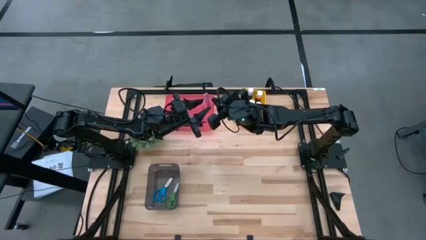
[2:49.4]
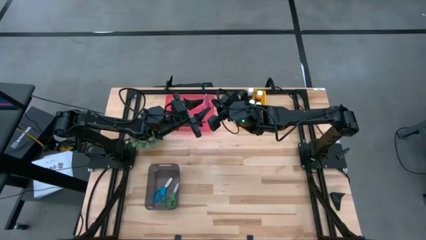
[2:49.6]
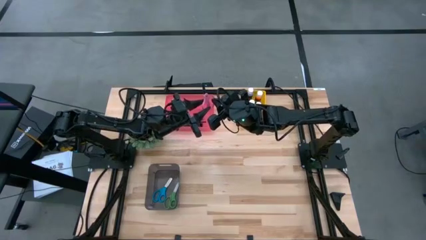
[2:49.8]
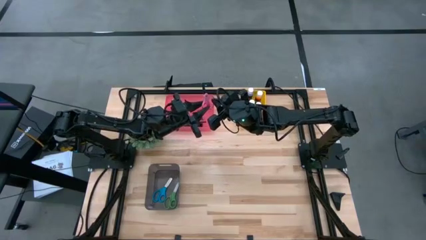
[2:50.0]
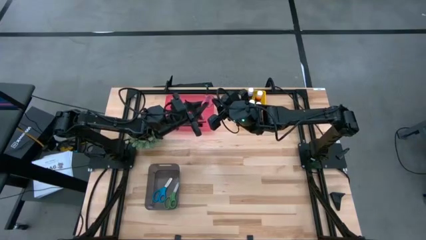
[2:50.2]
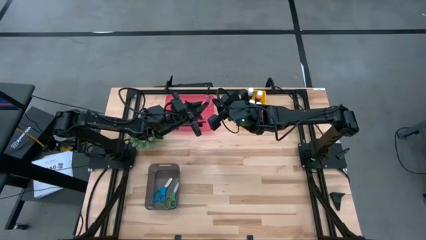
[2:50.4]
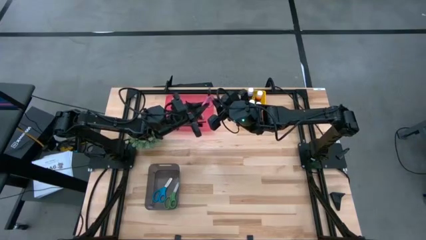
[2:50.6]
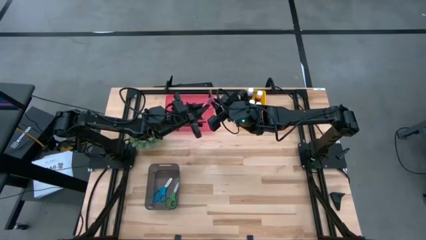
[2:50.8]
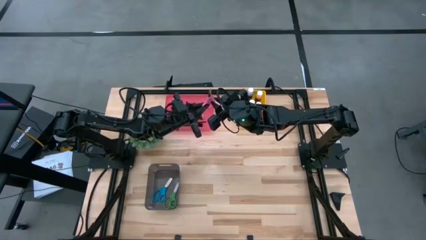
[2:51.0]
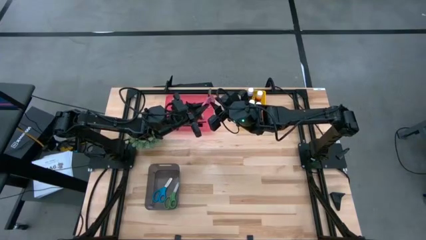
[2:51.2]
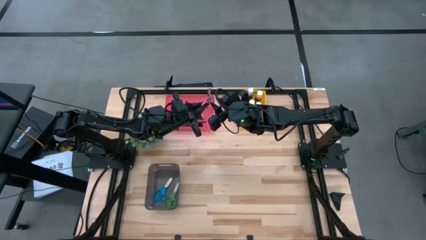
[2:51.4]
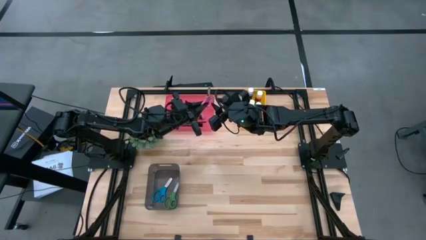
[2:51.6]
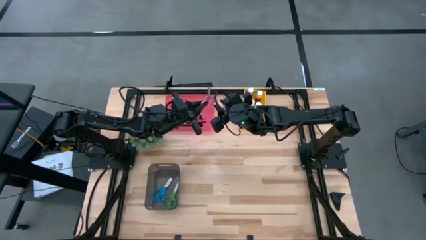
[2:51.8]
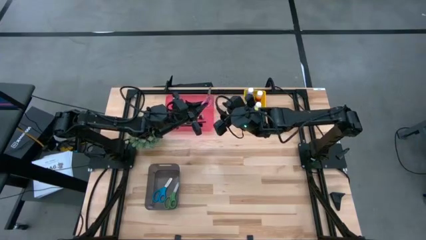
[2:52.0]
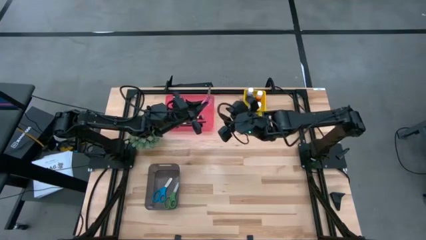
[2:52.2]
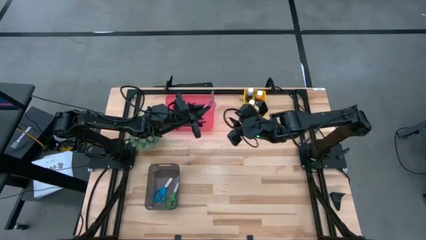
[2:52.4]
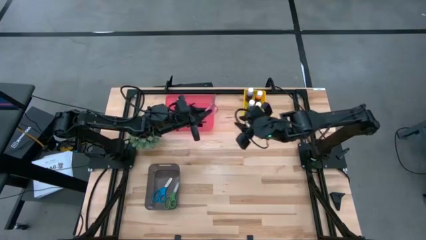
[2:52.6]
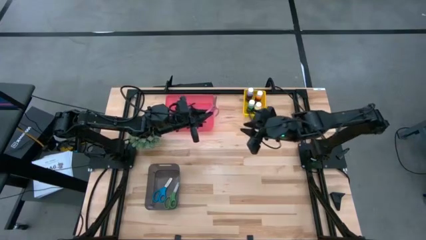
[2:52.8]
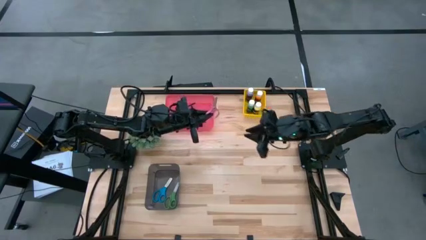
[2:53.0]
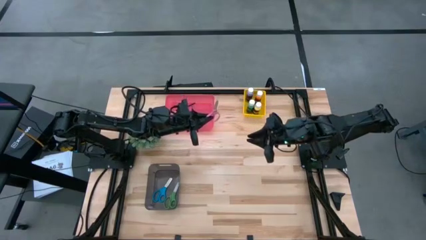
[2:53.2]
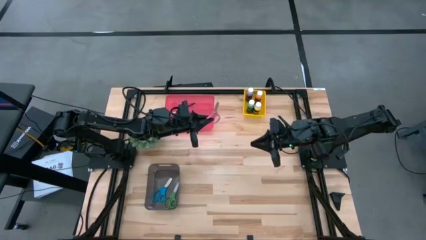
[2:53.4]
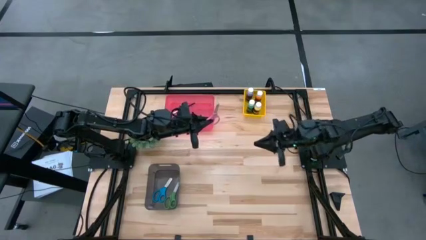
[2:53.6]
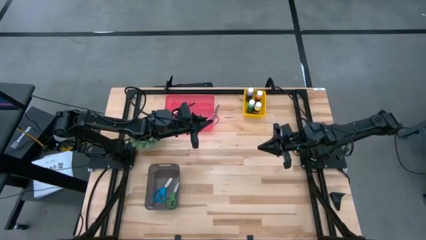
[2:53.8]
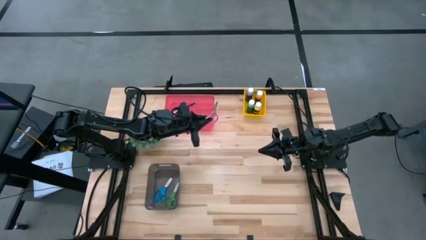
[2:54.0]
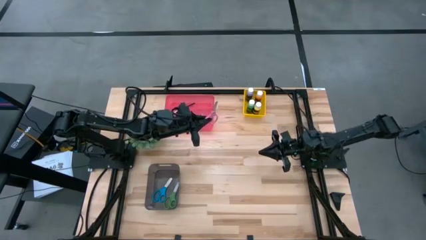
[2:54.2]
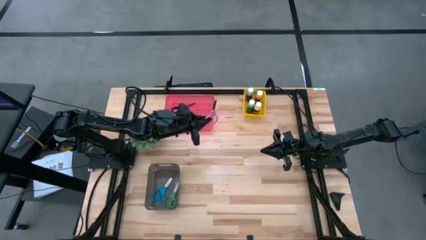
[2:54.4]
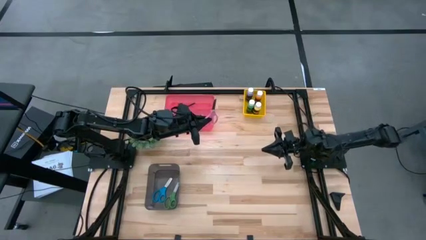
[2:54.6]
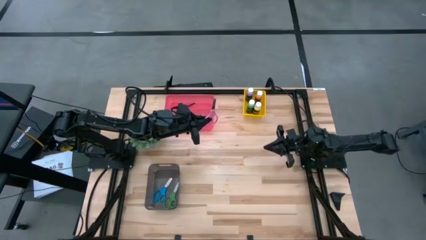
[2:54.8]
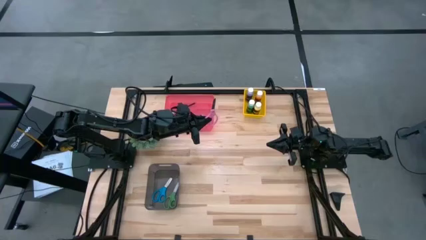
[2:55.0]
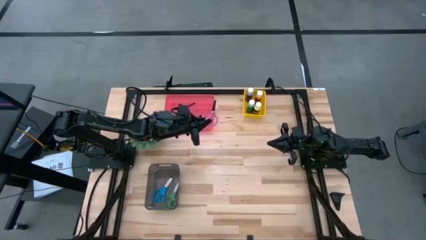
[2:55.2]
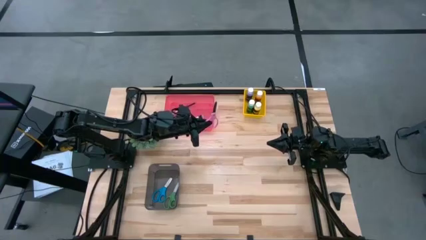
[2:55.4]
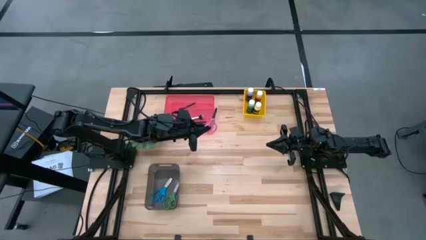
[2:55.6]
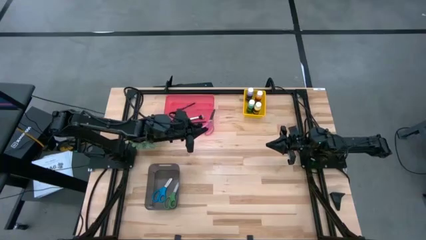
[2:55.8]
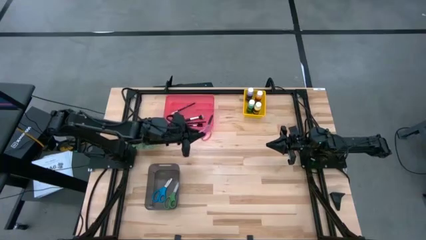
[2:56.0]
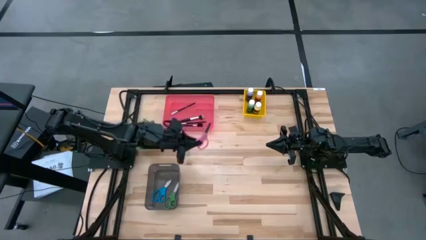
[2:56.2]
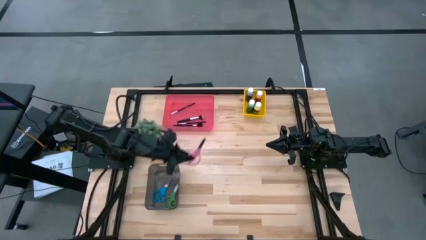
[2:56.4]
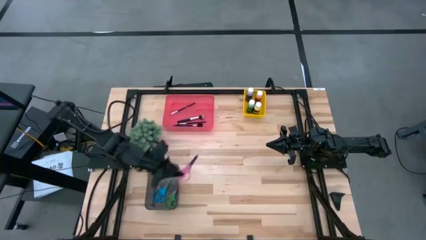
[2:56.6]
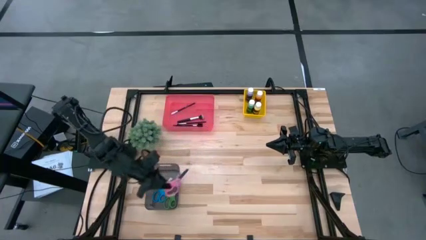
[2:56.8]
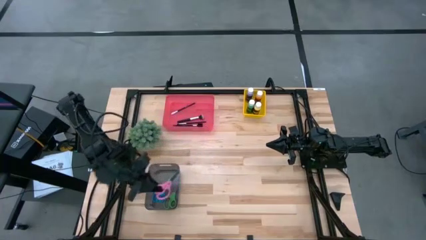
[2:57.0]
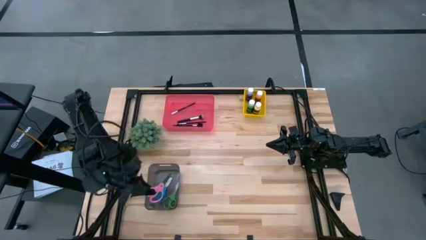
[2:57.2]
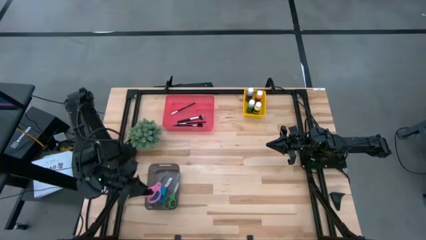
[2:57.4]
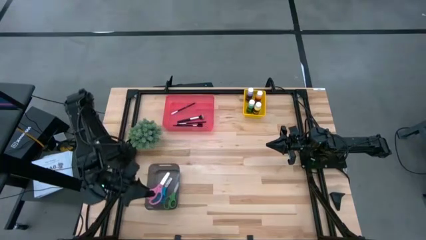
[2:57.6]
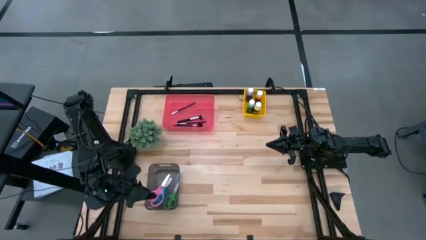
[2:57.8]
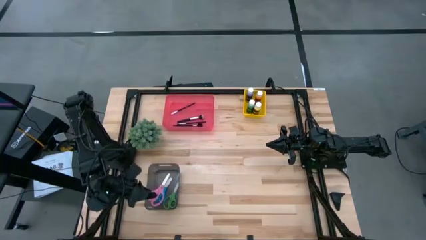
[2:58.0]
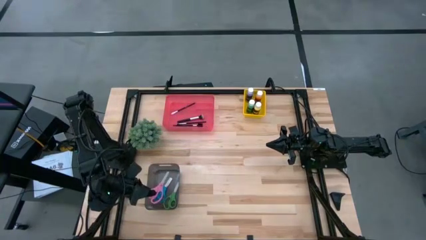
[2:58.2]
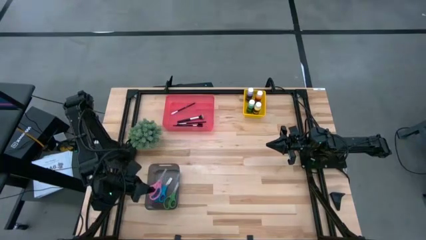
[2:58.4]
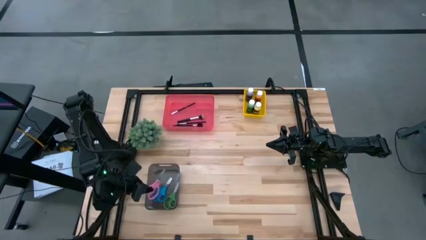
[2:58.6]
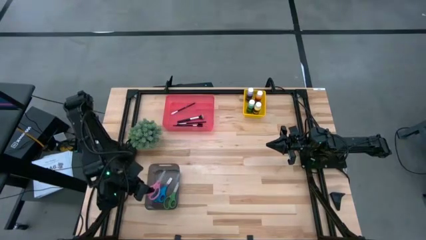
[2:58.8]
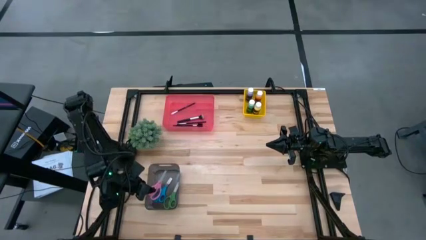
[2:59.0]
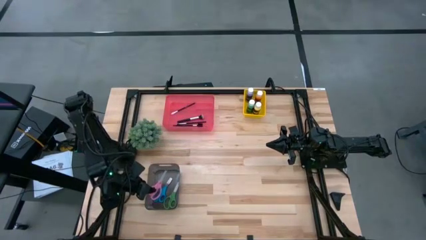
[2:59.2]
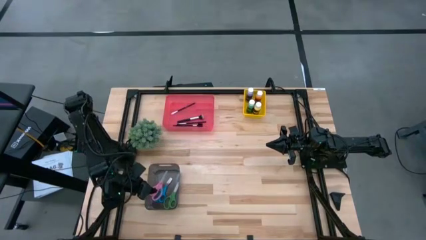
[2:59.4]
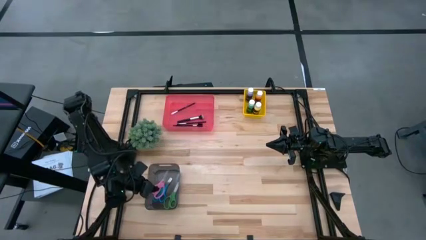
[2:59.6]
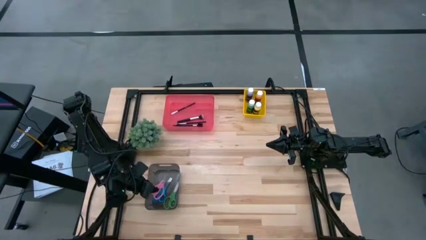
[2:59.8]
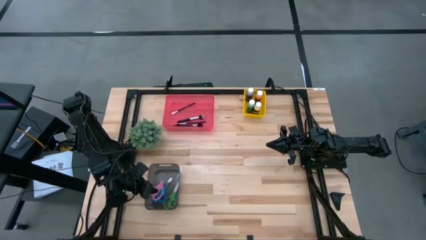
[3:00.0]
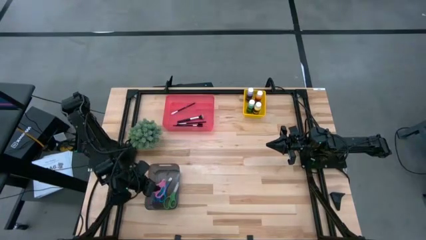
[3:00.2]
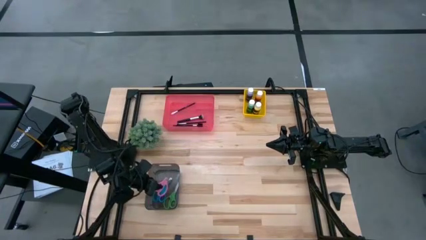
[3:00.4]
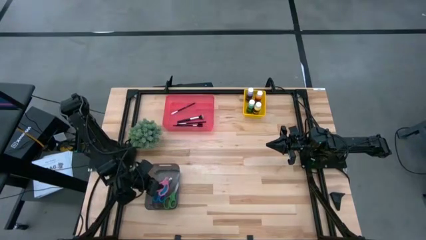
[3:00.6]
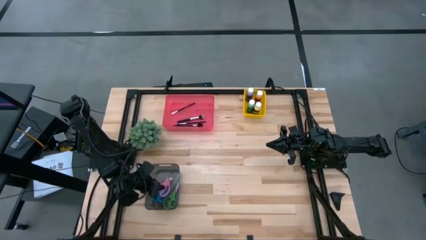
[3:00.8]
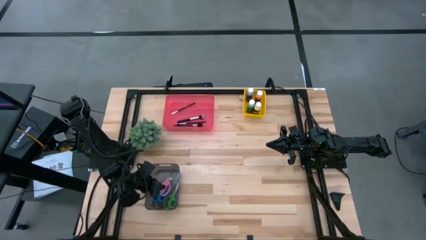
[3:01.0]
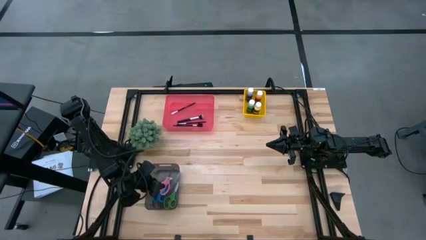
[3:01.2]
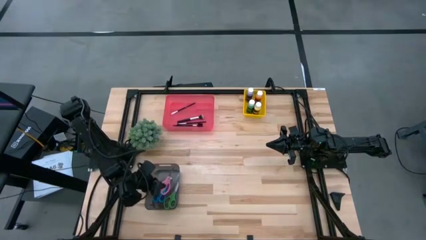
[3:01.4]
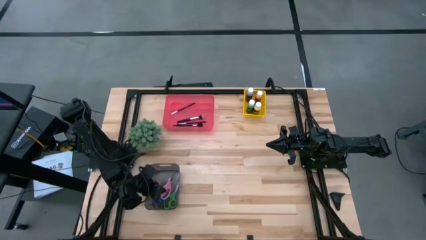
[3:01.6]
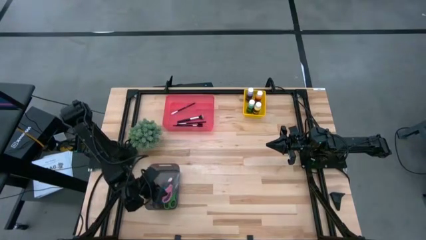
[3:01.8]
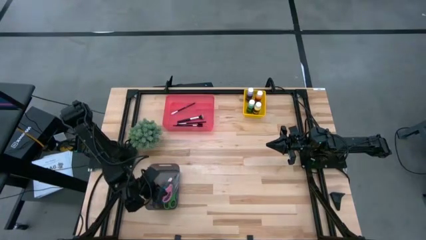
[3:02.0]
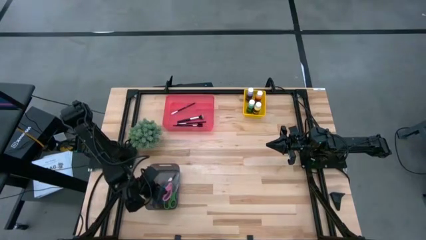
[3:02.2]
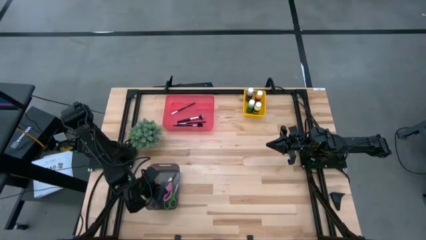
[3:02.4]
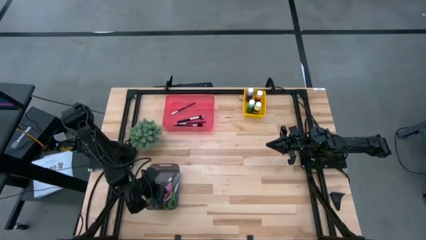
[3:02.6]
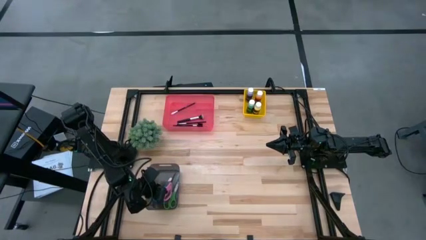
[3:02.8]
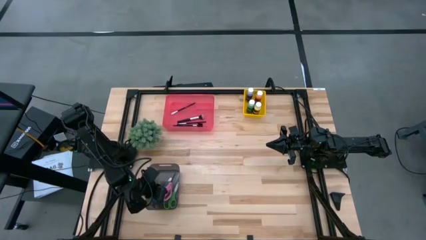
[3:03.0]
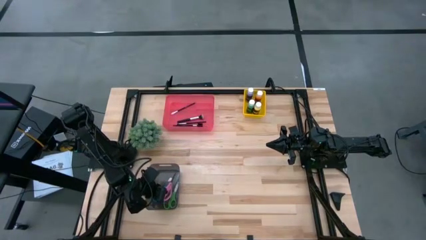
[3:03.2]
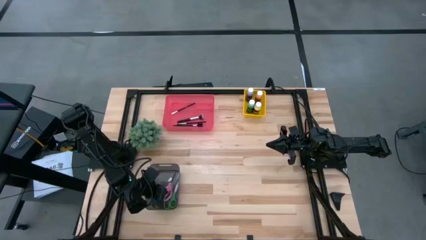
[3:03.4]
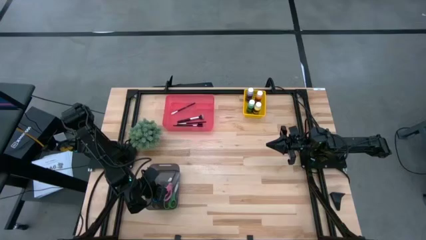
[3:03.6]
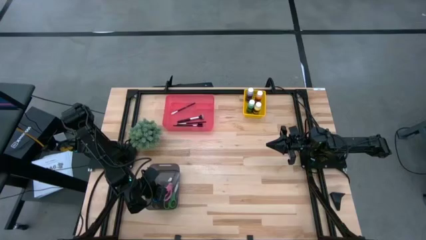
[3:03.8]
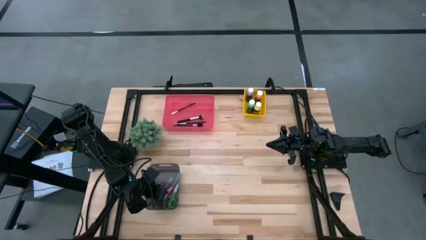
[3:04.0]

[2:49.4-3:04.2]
Task: Pick & Place Paint Supplies
Put the pink scissors into the black bin

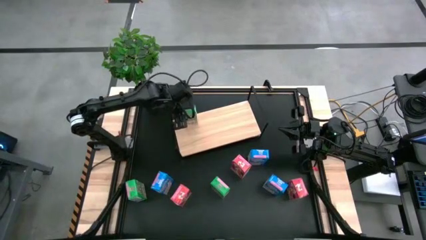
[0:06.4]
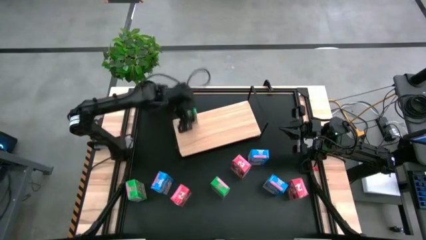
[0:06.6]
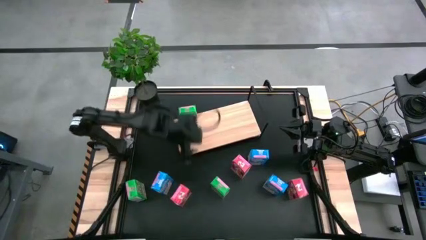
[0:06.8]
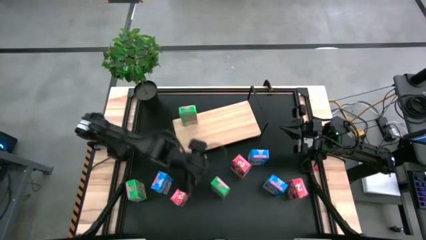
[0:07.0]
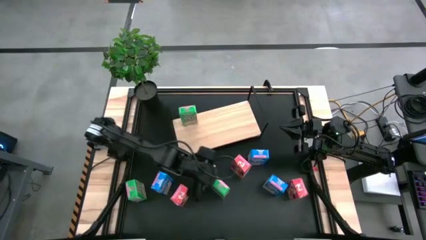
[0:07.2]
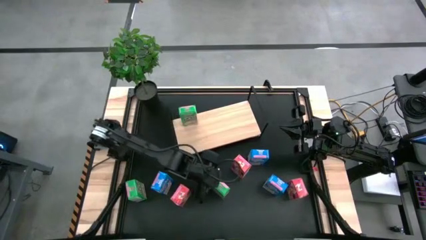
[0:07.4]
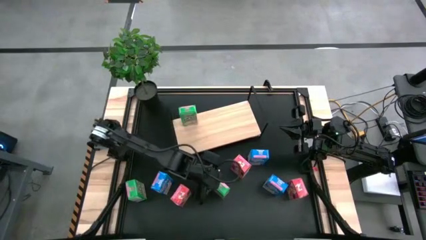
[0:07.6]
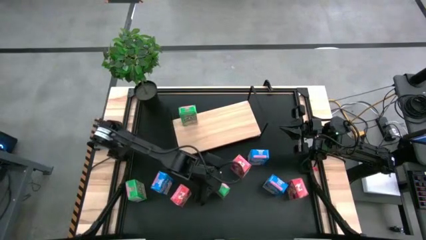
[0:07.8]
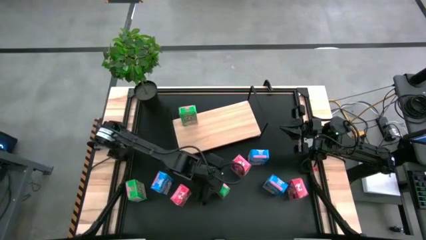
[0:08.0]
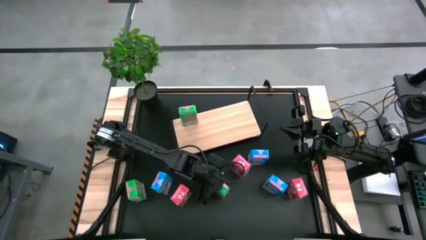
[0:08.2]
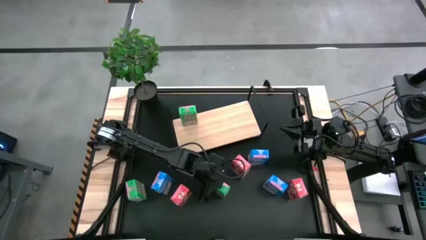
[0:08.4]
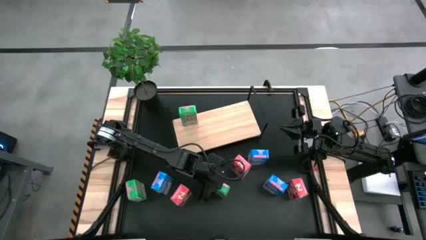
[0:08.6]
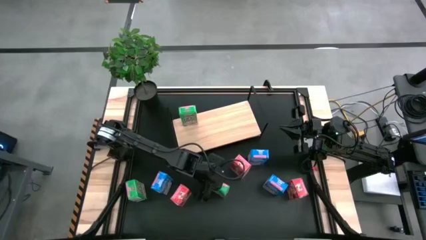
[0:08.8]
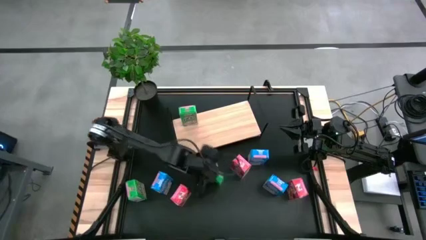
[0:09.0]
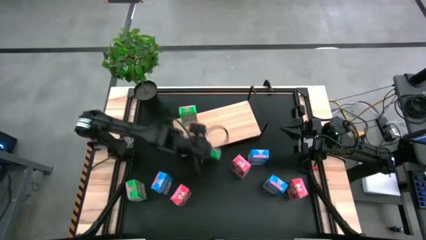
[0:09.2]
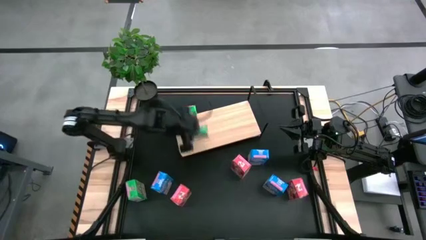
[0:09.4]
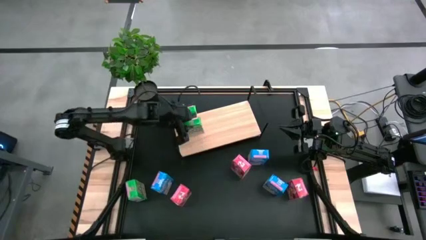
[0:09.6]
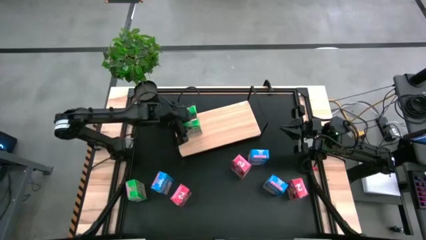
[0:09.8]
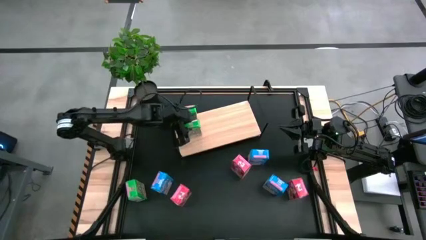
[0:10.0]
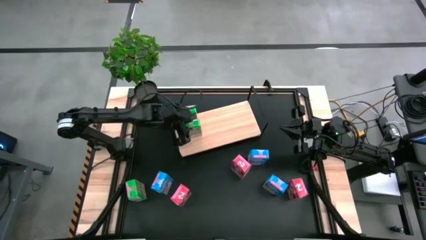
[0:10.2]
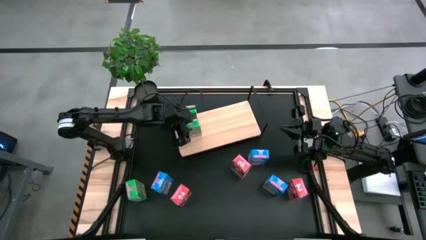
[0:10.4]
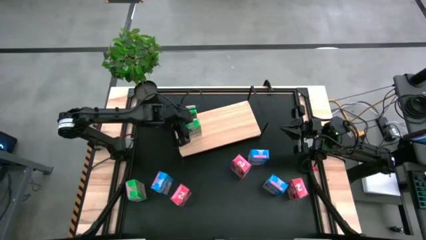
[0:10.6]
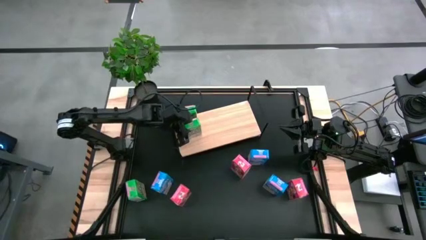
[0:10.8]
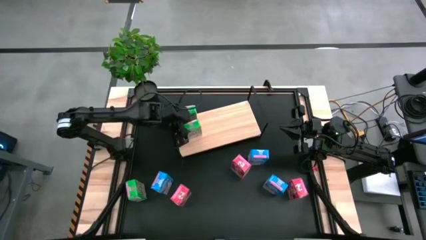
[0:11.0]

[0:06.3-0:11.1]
Task: Stack cereal on shelf
Put the right green cereal box on the shelf
